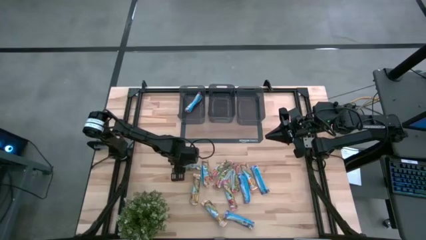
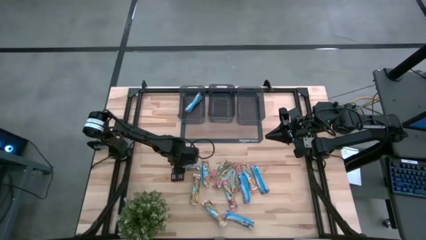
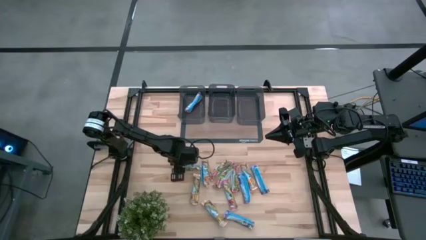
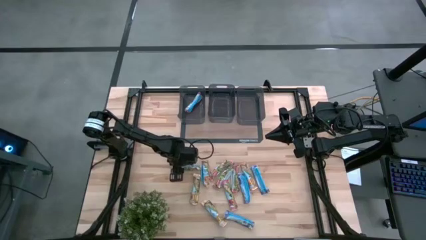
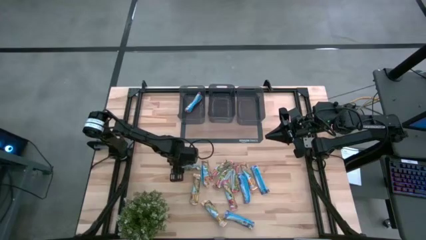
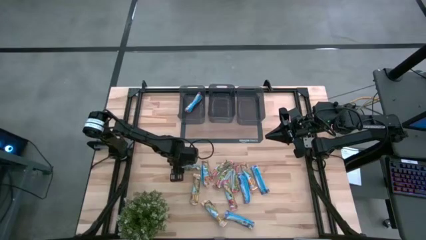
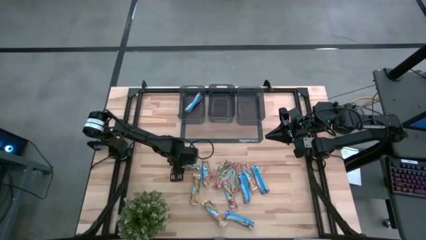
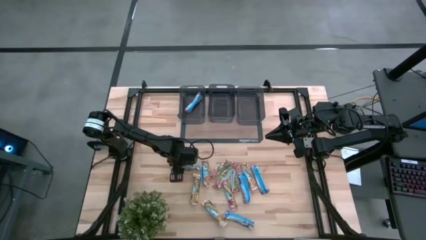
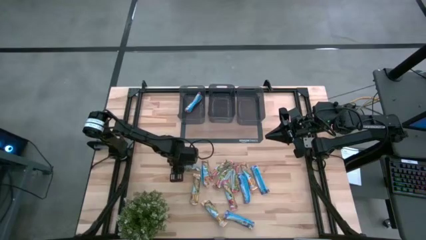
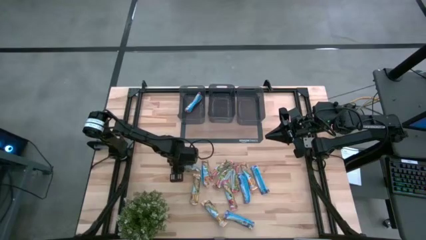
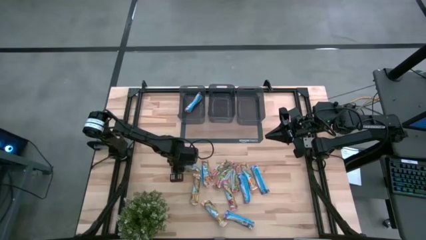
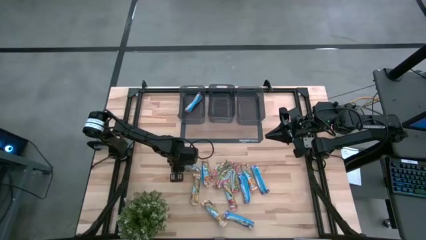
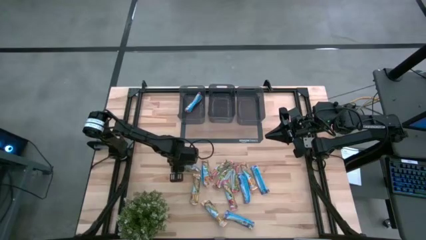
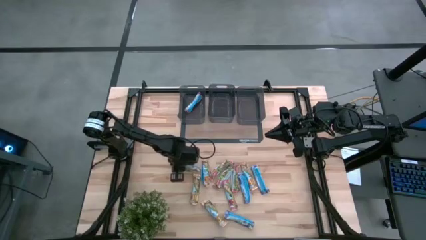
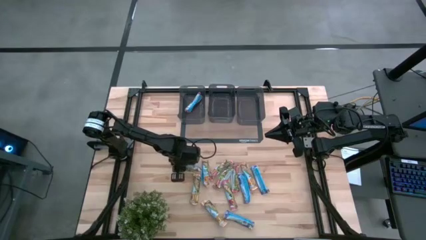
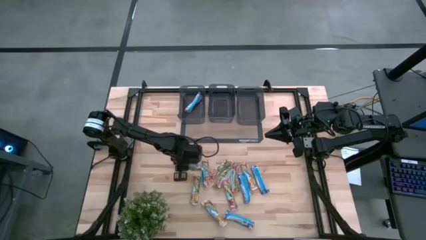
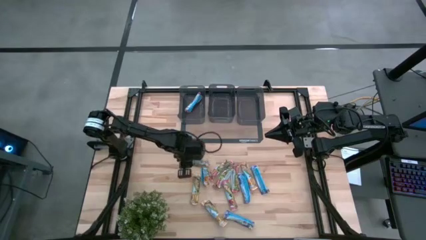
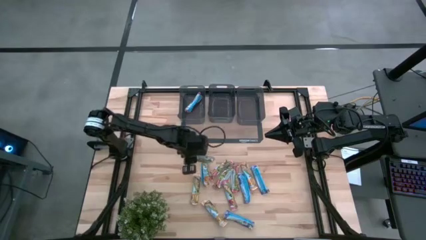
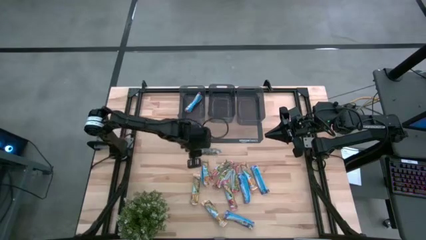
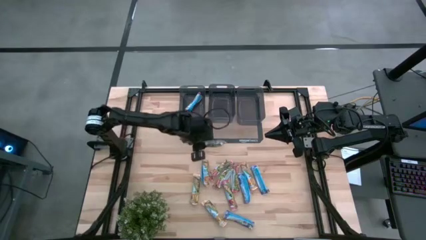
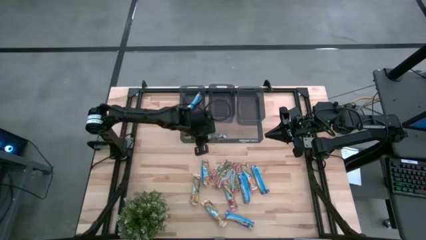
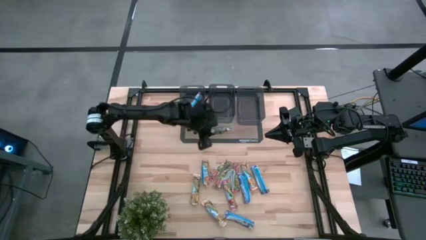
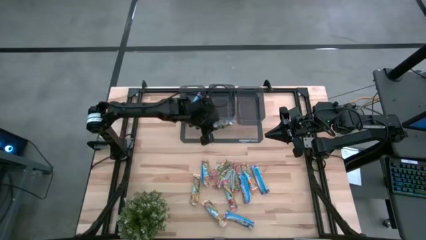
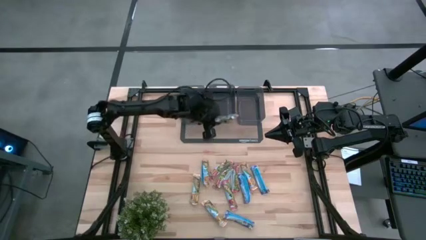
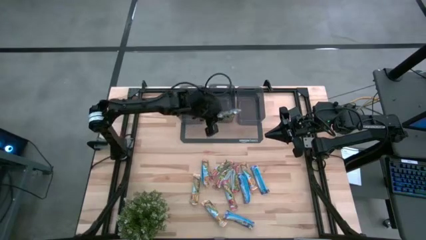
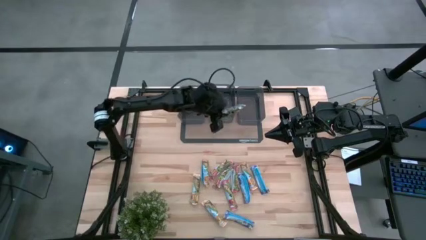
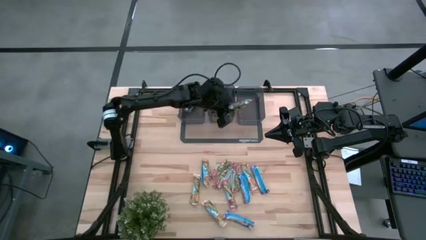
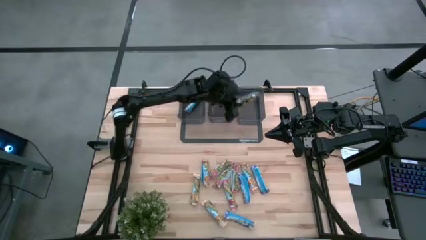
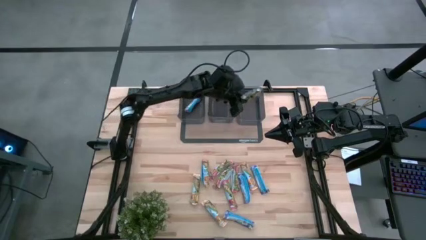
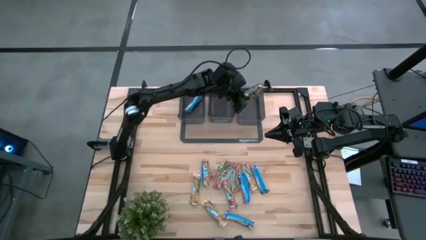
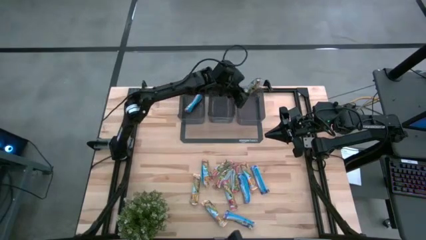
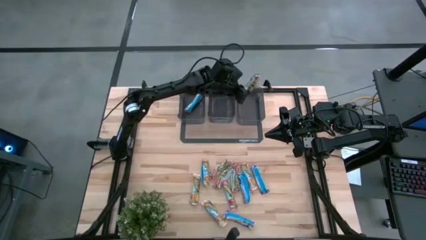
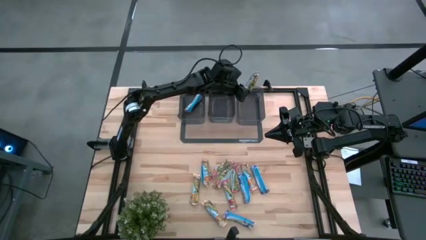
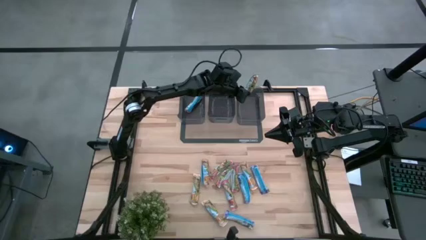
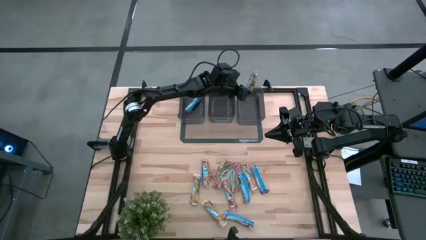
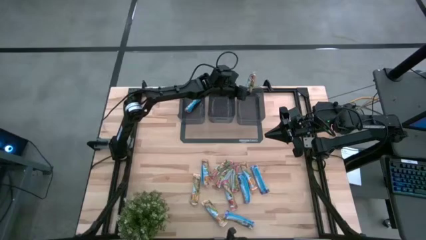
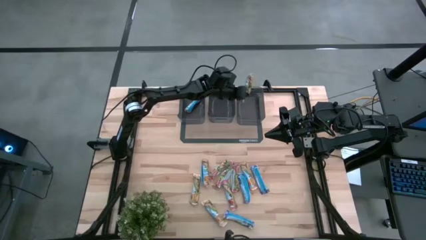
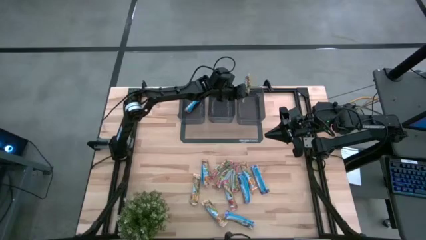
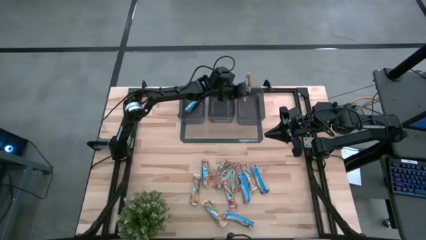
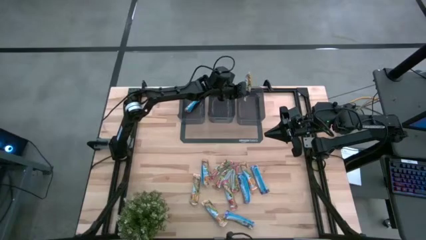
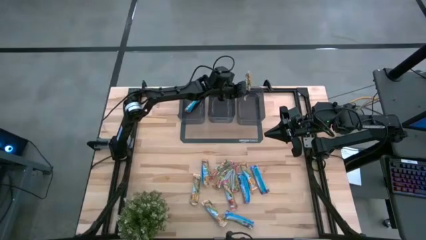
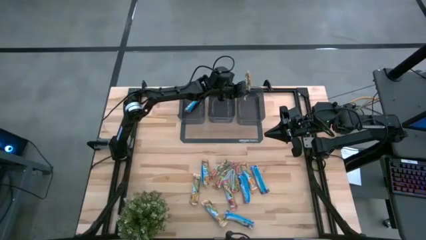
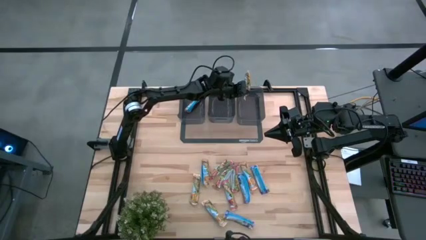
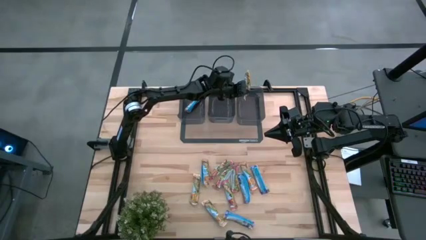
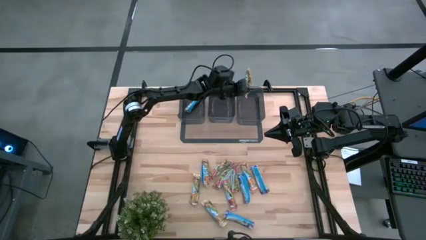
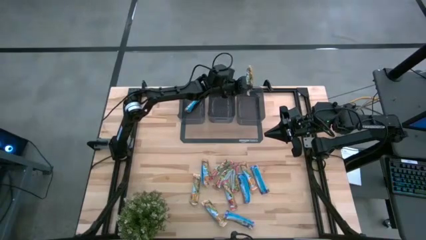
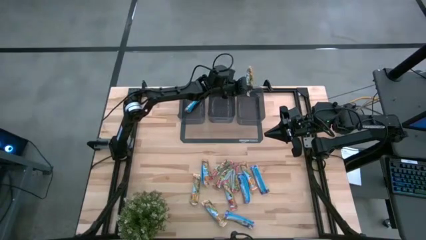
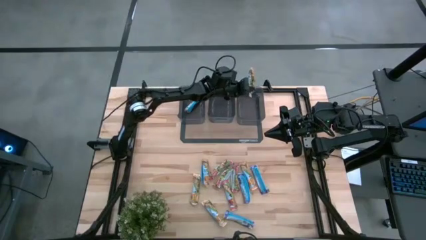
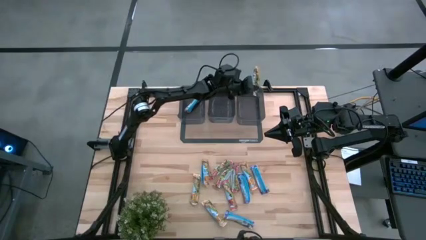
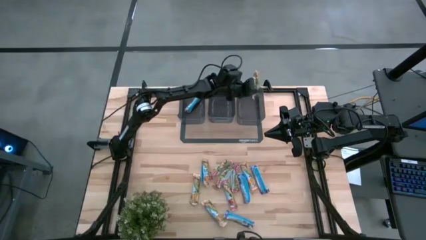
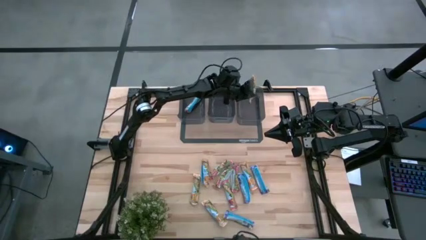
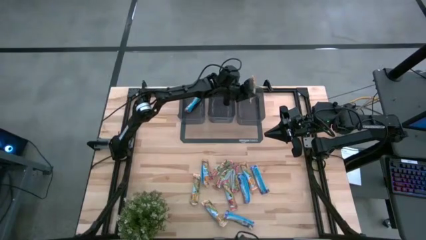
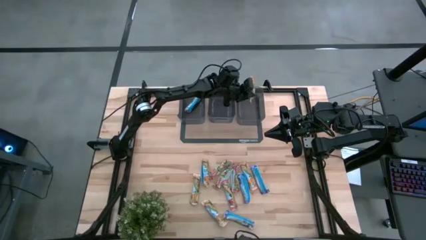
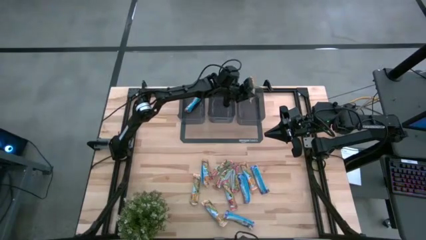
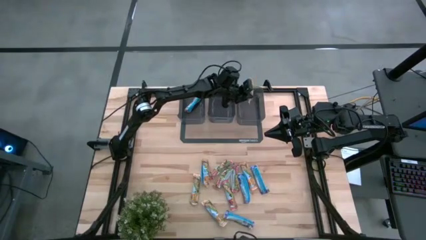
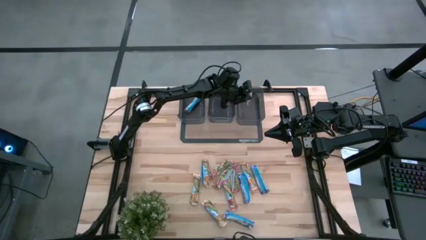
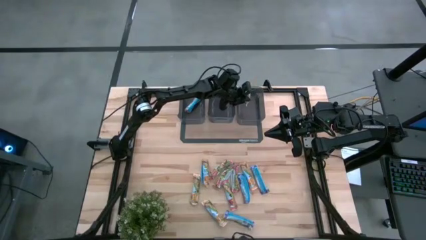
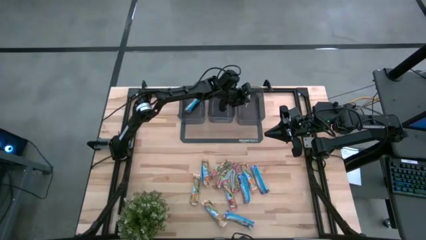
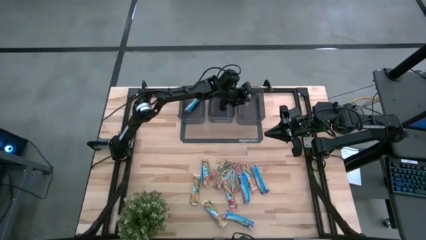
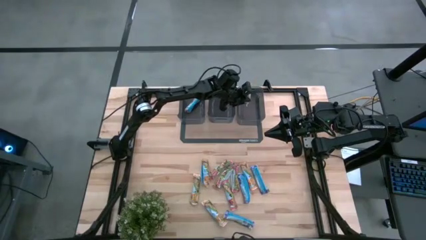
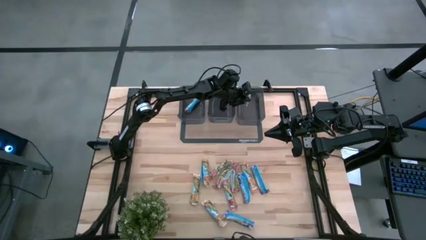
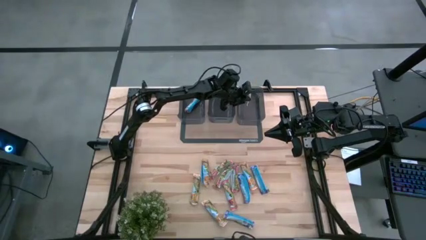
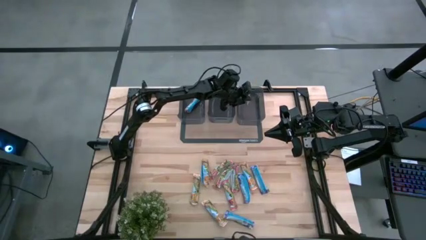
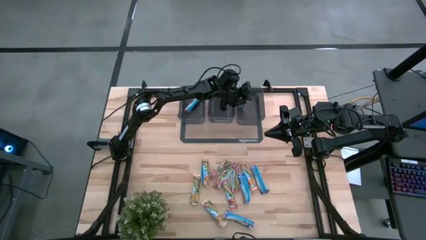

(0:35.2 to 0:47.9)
Task: Pick and place Granola Bars by type
Put the yellow granola bar into the right black bin
